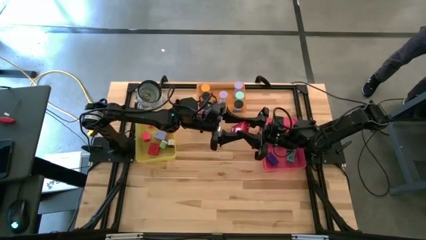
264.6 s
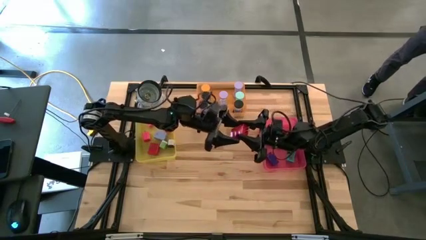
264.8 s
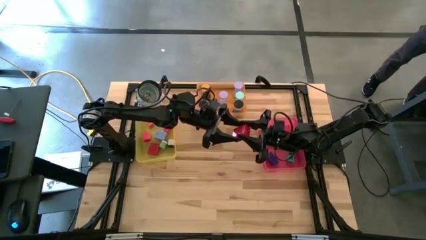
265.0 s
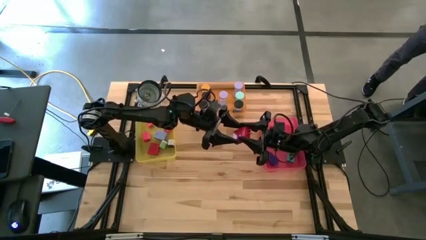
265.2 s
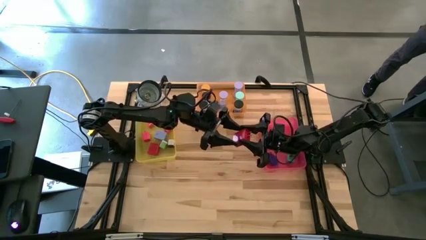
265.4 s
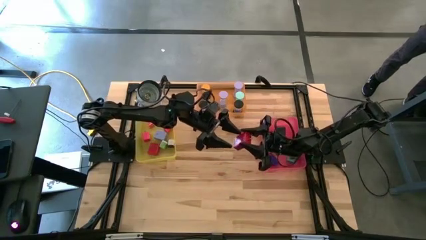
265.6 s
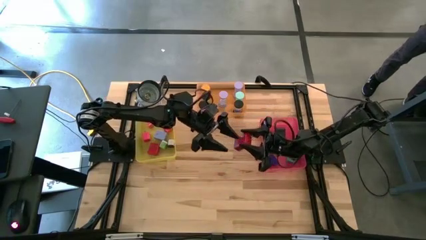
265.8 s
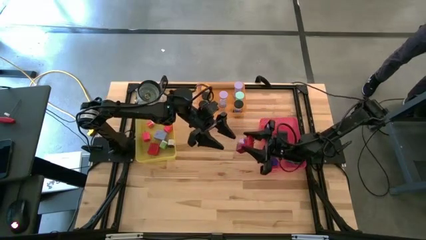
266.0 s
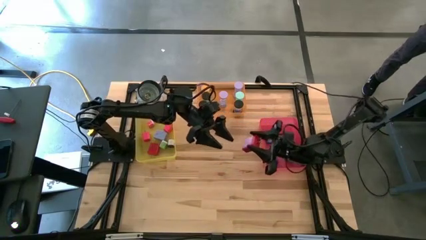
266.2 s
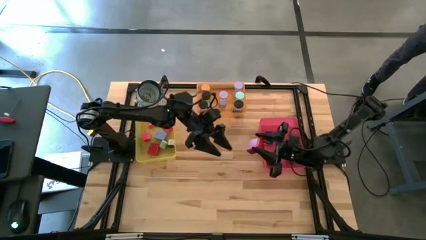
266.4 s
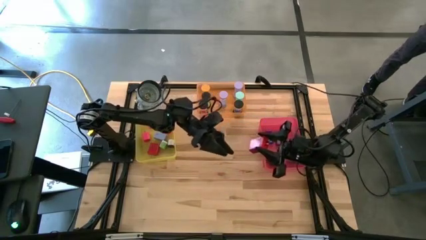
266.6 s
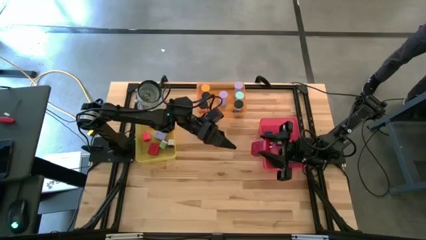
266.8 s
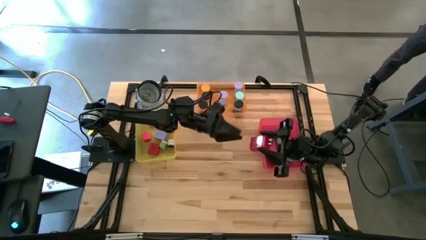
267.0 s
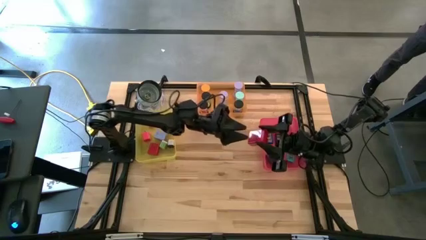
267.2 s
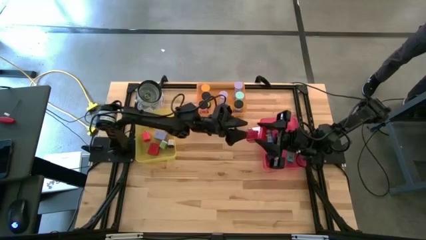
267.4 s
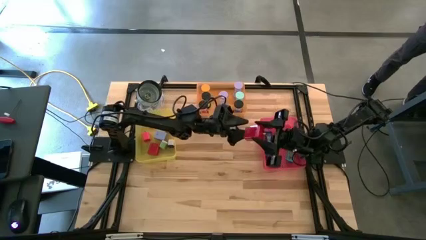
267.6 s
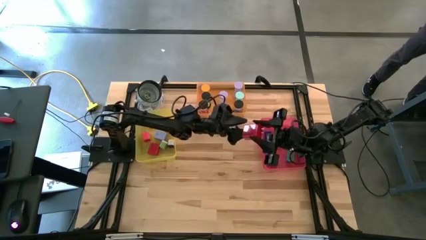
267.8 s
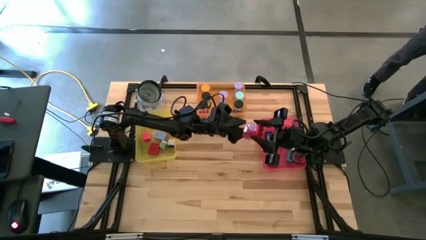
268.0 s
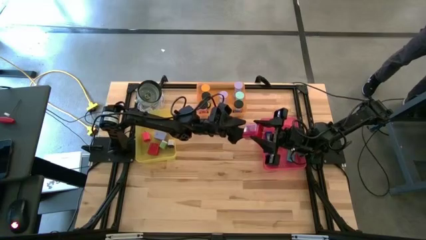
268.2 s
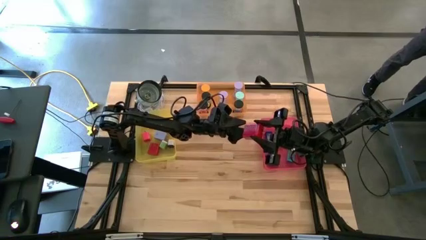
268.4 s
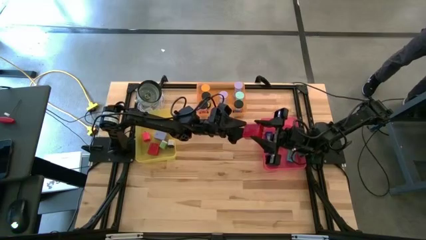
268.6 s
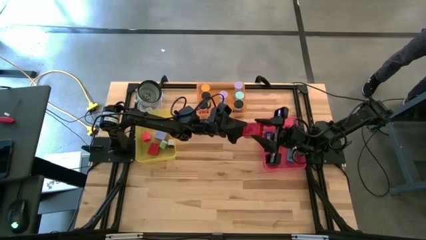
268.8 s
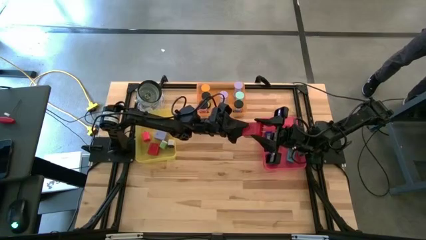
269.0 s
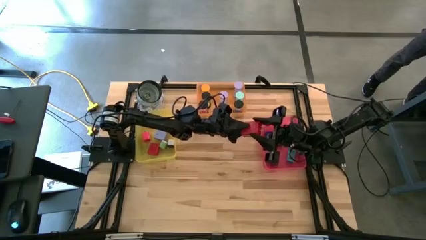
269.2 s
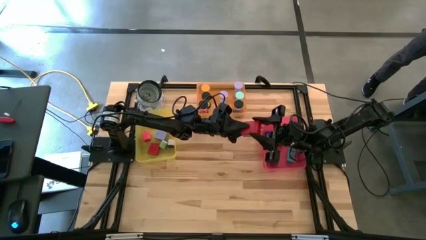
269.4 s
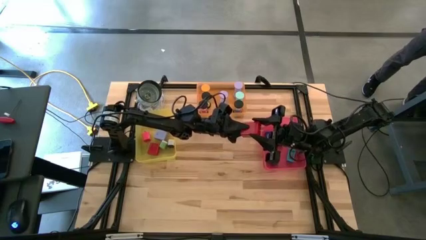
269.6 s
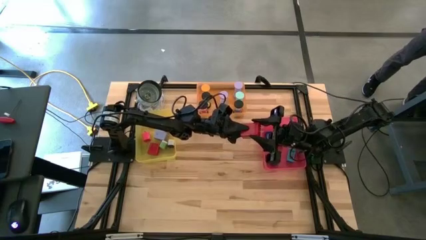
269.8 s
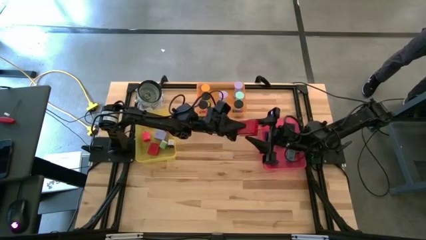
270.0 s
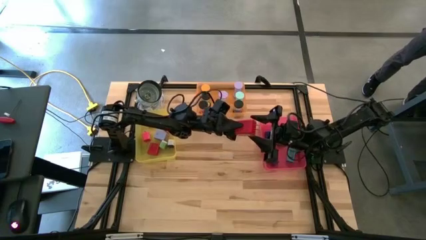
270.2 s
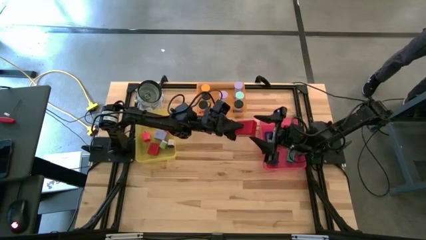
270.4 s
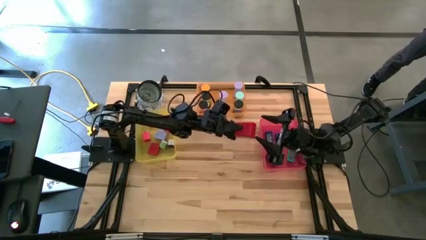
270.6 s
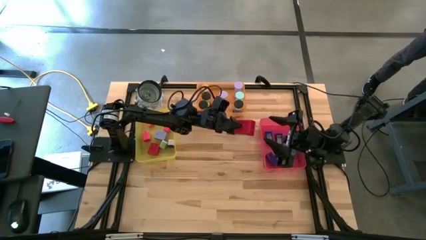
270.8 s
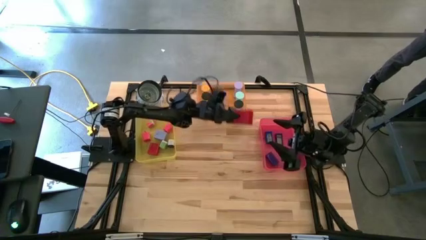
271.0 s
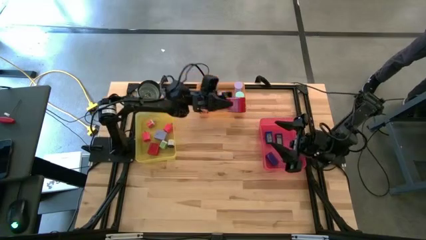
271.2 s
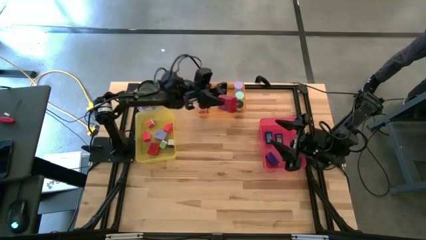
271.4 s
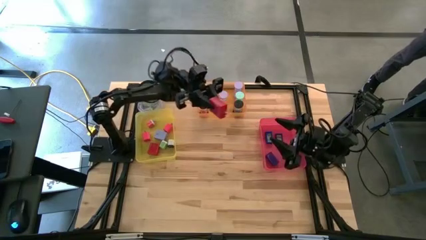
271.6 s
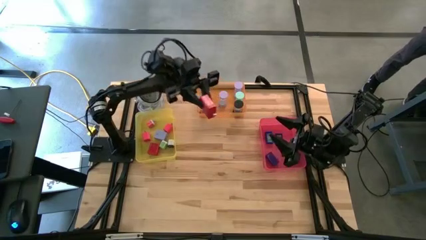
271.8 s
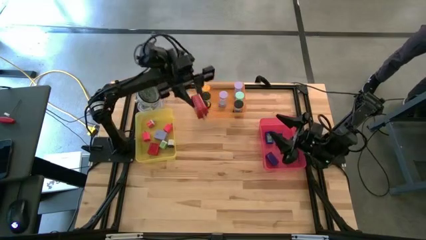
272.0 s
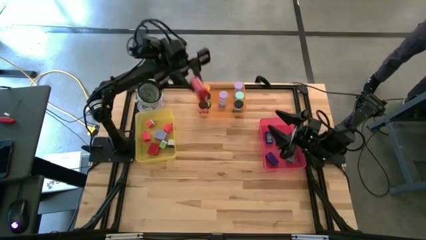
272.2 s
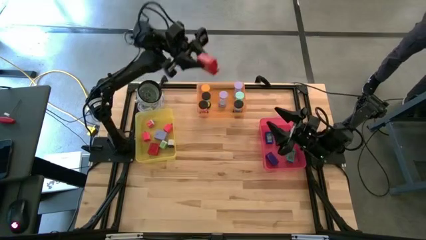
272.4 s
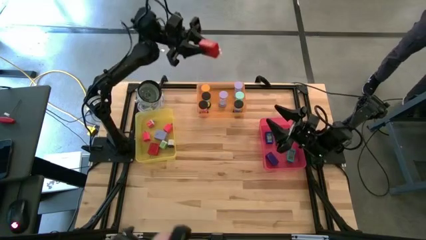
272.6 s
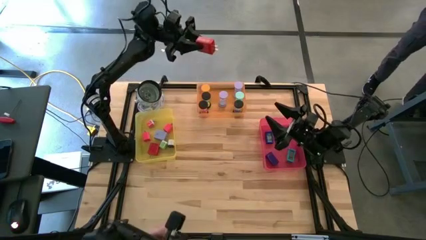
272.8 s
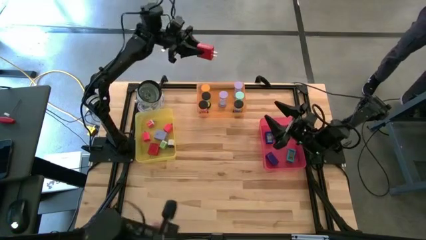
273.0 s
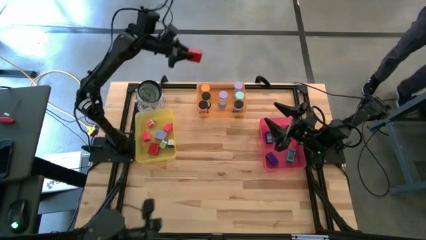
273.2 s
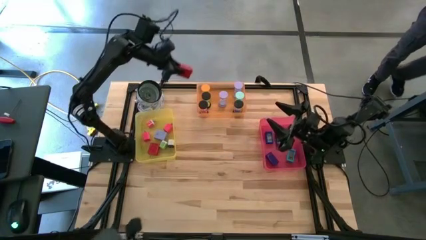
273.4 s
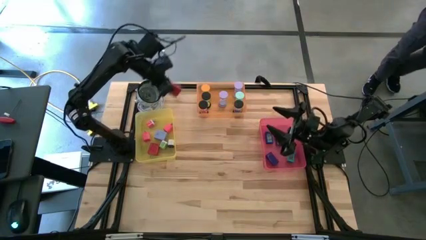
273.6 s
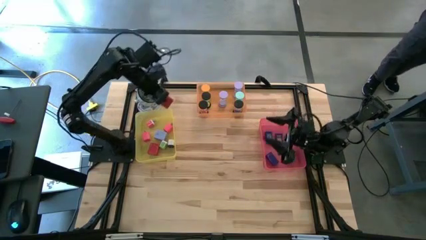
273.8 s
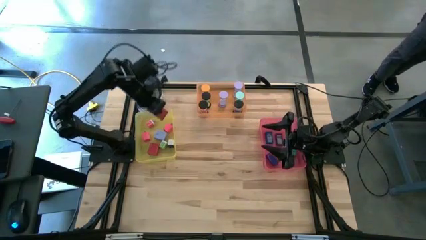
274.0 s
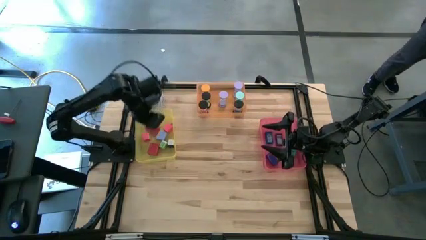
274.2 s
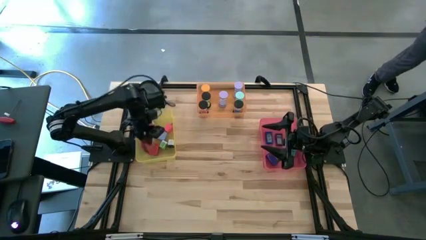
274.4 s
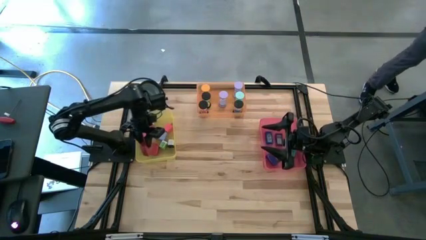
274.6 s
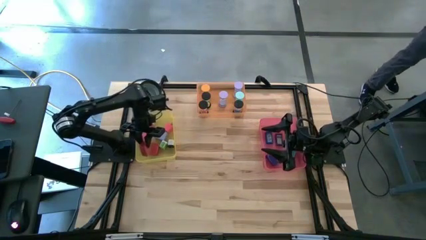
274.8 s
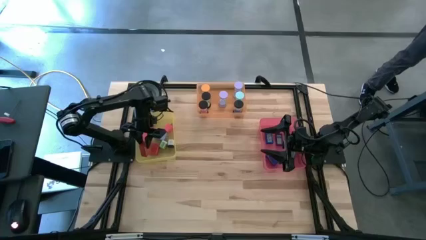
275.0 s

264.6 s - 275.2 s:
Task: Pick & Place Office items
Put the red charger in the yellow bin

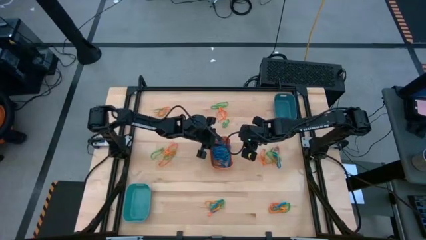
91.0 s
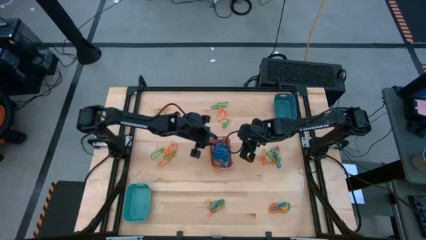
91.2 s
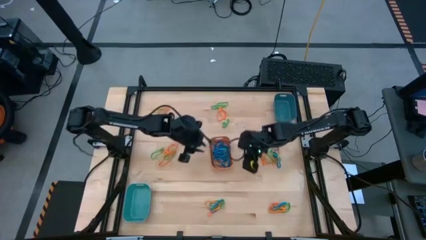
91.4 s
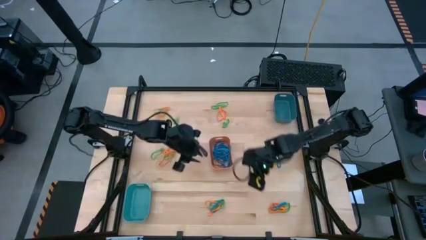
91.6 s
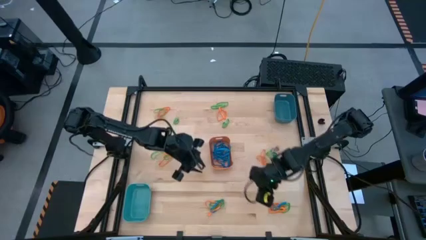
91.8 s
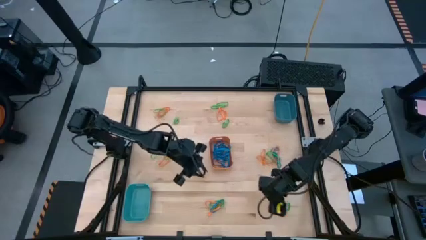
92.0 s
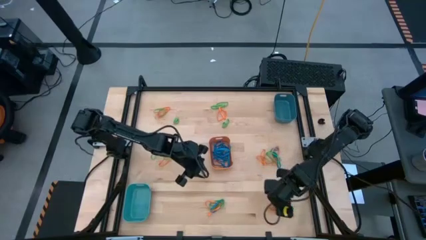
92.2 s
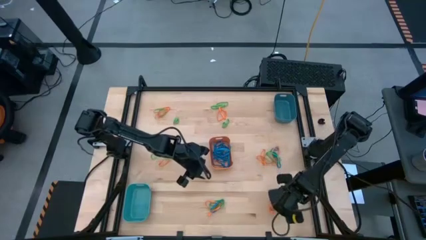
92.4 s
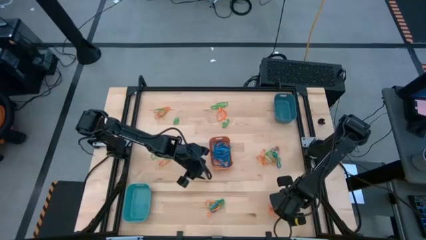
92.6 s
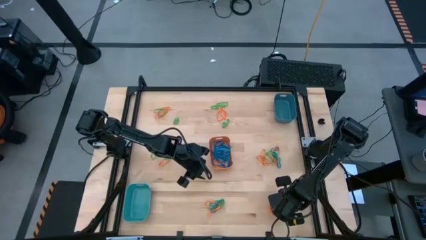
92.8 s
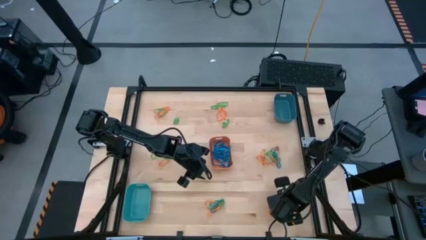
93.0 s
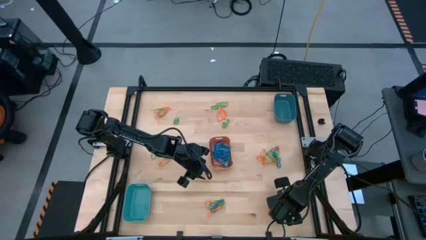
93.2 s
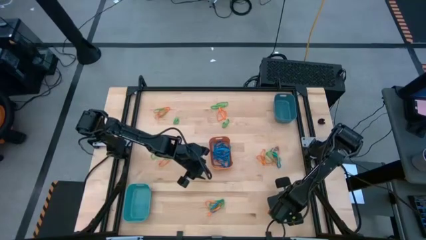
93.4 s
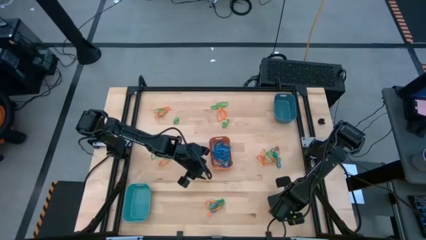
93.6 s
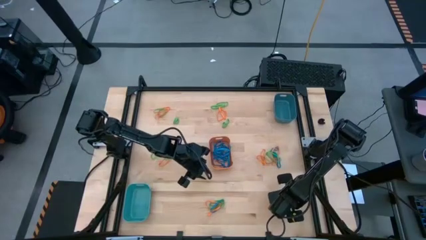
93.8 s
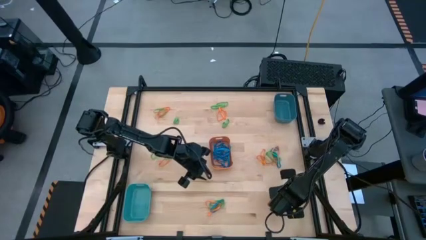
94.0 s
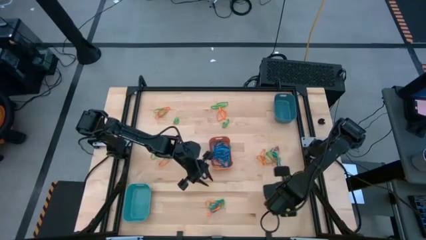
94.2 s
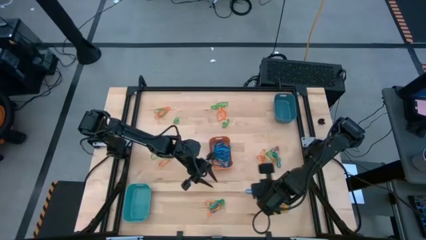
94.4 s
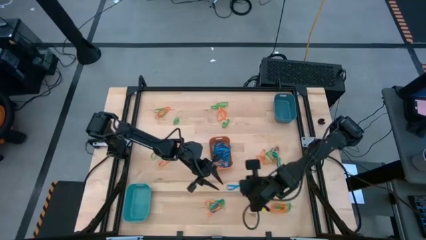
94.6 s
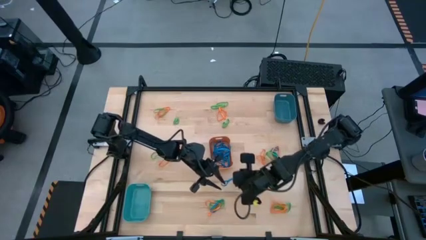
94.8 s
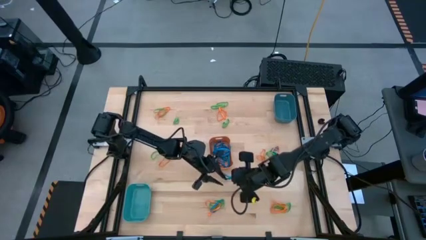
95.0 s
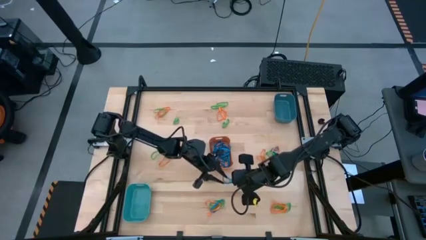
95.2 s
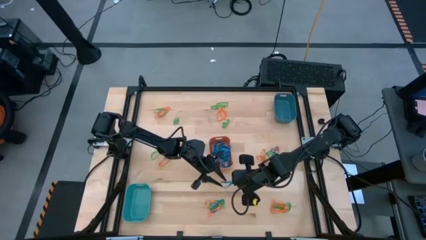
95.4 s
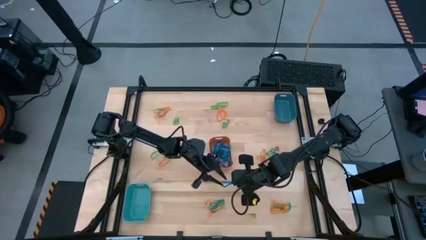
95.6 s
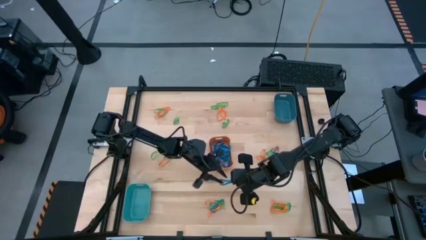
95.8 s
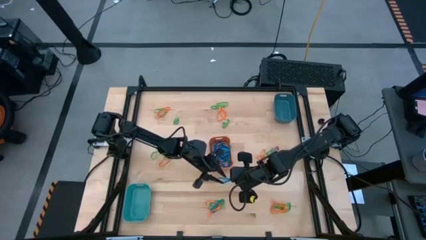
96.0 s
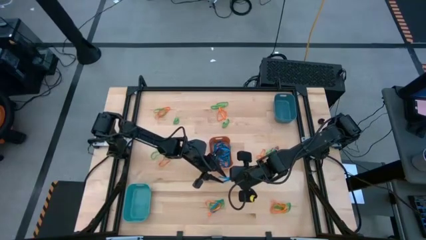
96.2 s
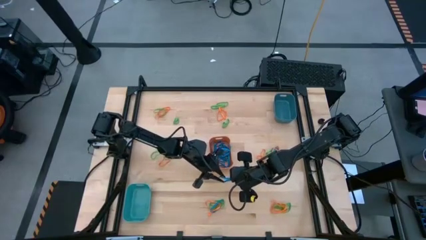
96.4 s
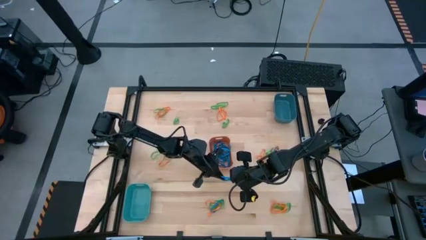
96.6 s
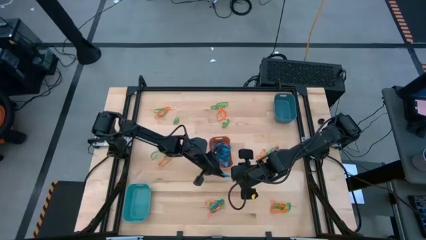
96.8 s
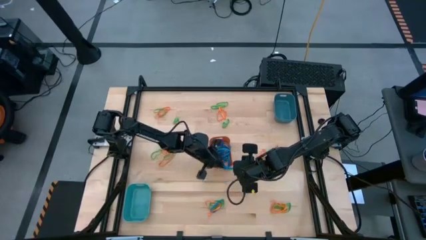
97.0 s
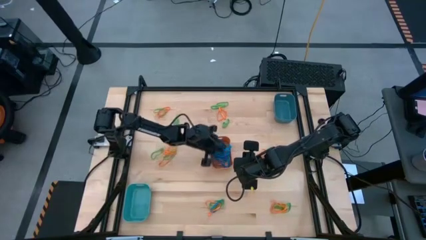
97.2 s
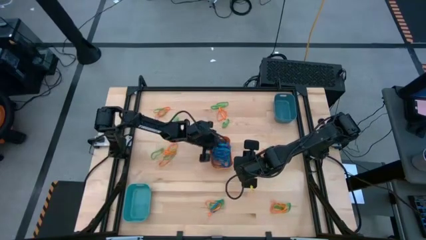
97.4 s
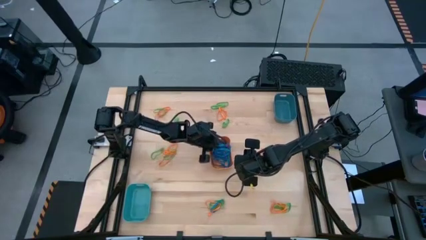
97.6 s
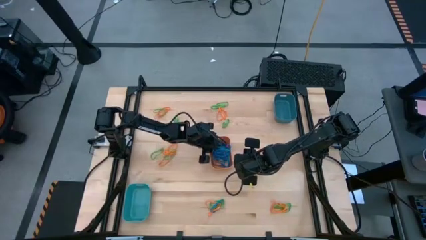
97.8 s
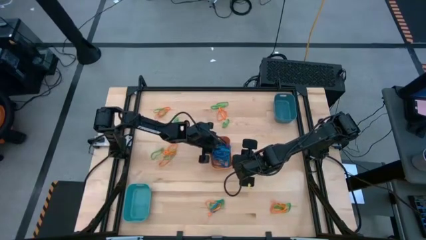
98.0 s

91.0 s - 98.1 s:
Task: Sort rubber bands into baskets
Put the blue rubber band into the orange bin
